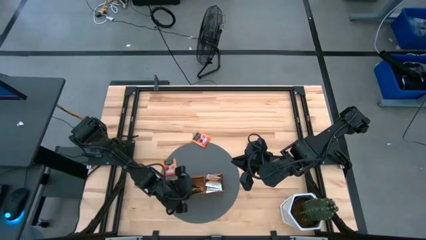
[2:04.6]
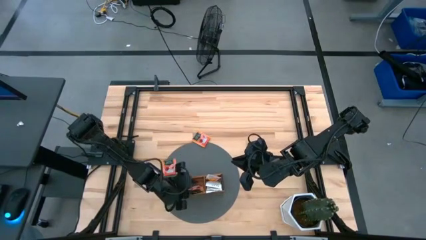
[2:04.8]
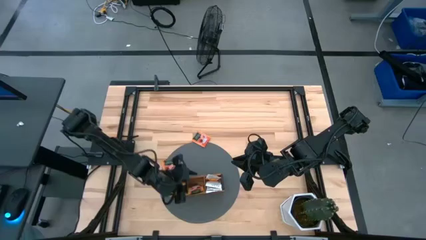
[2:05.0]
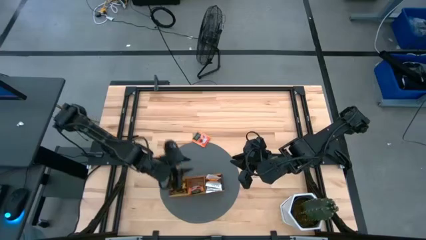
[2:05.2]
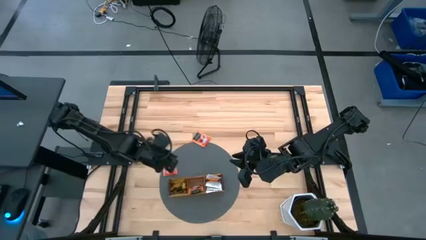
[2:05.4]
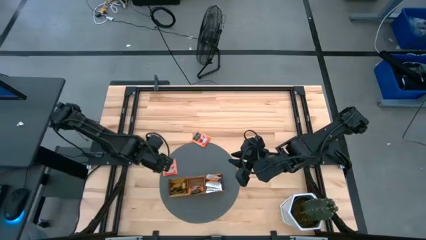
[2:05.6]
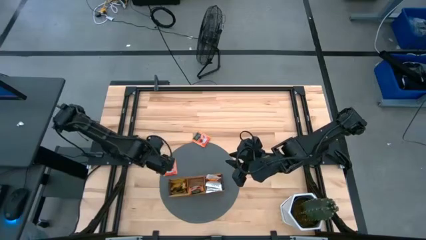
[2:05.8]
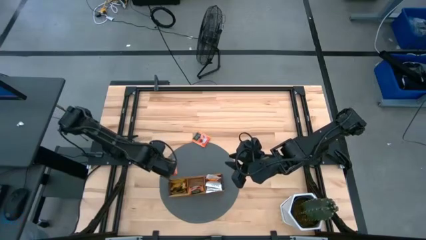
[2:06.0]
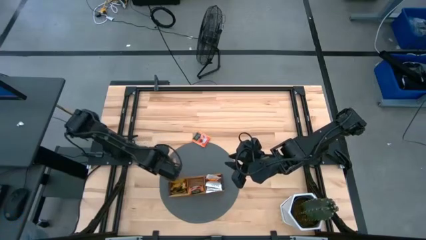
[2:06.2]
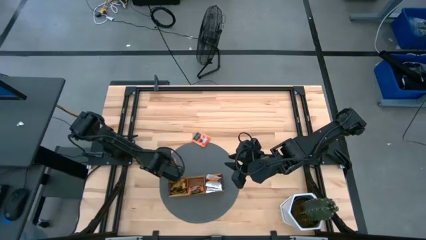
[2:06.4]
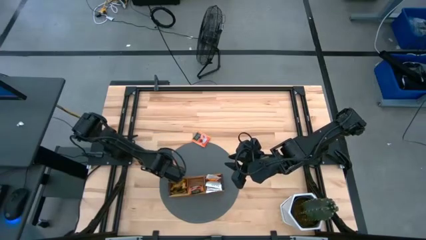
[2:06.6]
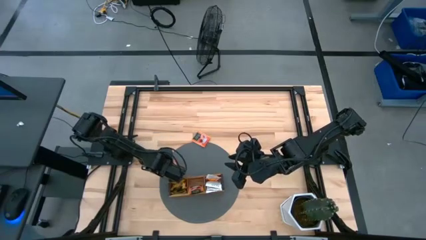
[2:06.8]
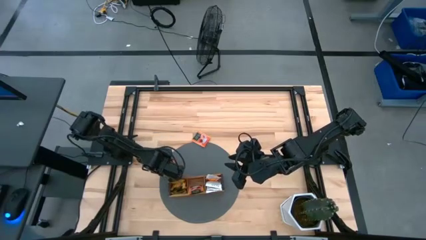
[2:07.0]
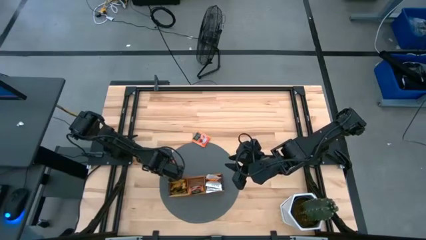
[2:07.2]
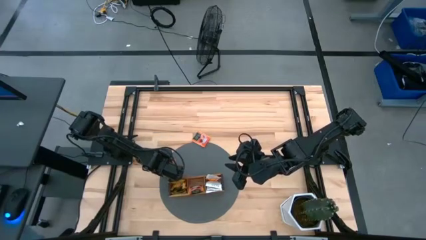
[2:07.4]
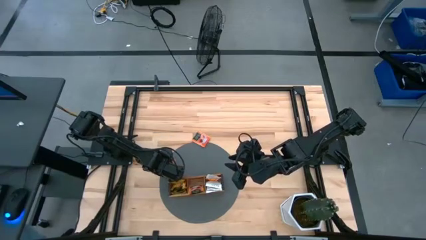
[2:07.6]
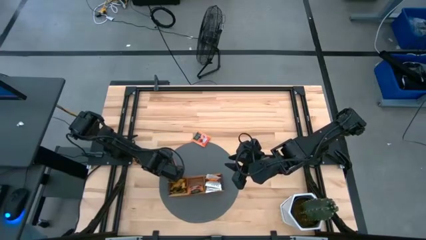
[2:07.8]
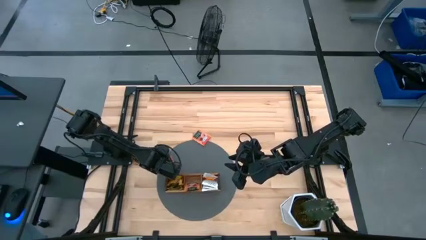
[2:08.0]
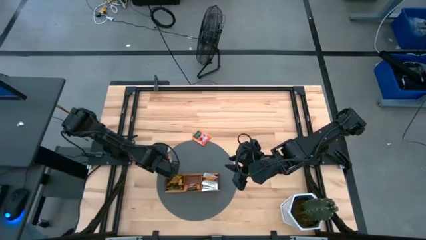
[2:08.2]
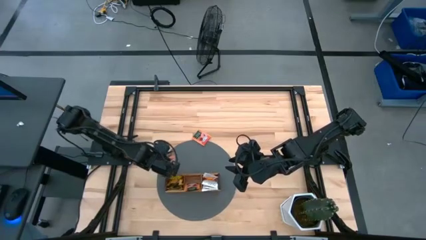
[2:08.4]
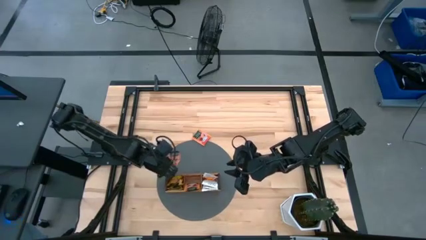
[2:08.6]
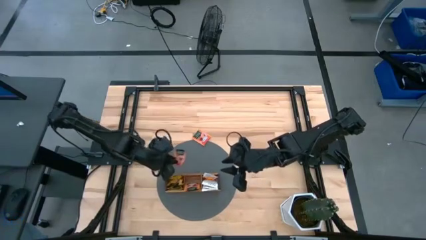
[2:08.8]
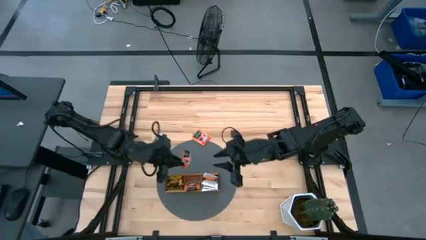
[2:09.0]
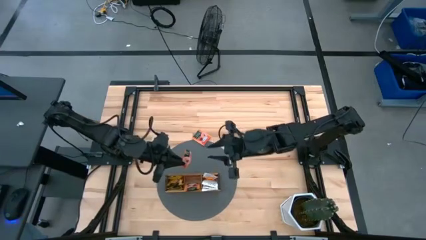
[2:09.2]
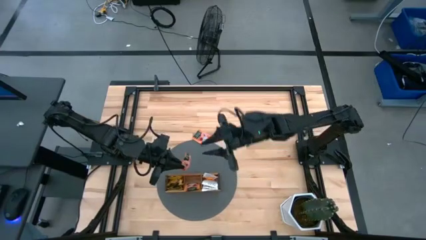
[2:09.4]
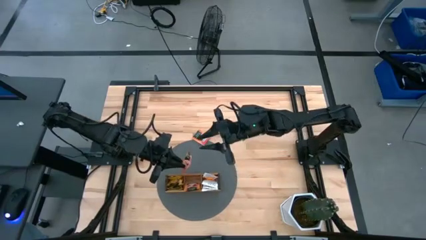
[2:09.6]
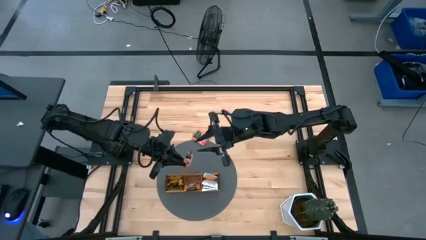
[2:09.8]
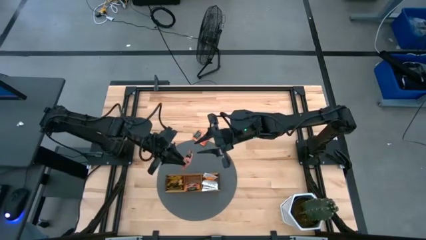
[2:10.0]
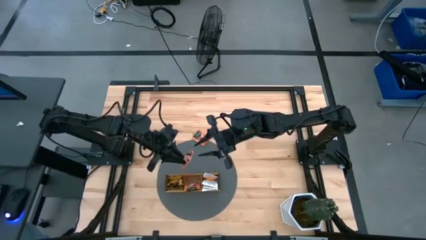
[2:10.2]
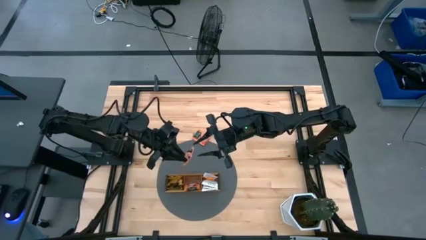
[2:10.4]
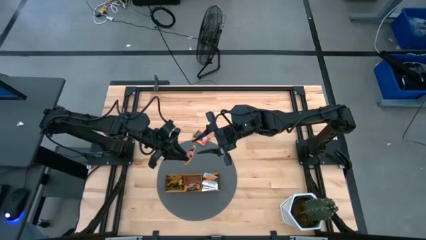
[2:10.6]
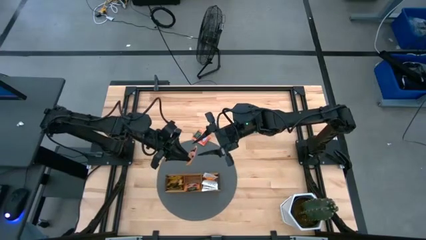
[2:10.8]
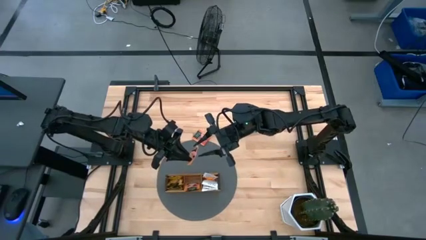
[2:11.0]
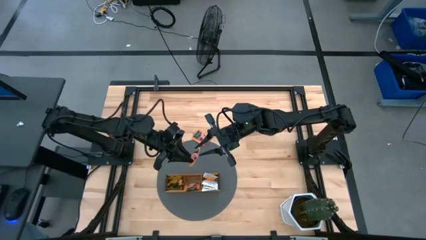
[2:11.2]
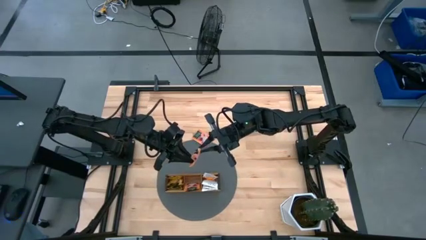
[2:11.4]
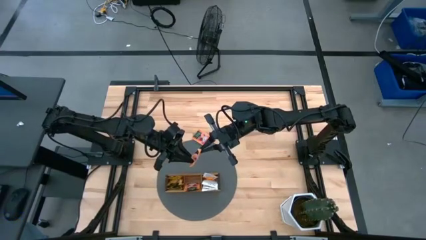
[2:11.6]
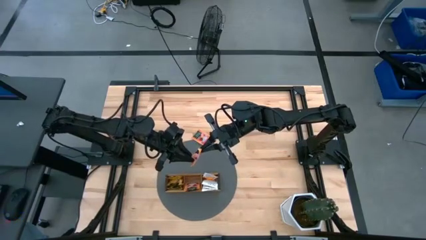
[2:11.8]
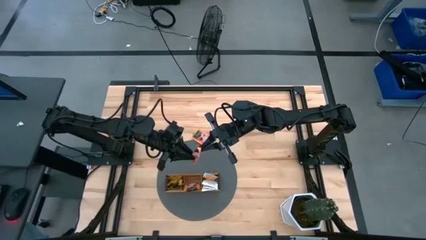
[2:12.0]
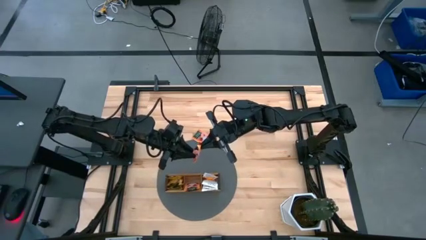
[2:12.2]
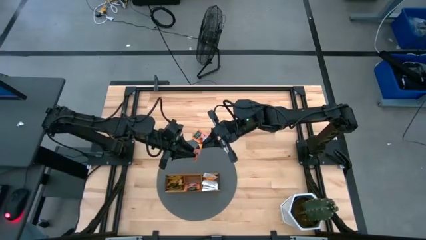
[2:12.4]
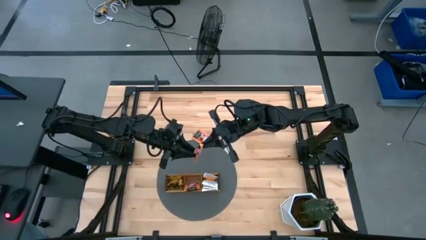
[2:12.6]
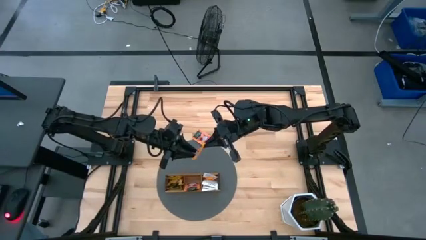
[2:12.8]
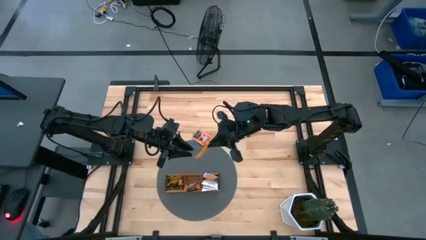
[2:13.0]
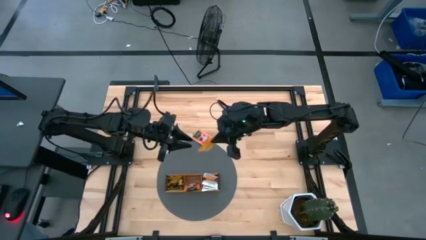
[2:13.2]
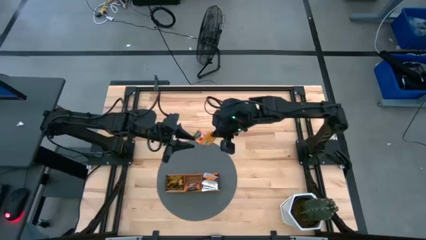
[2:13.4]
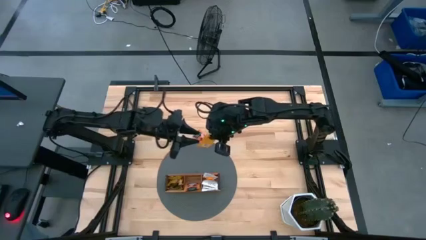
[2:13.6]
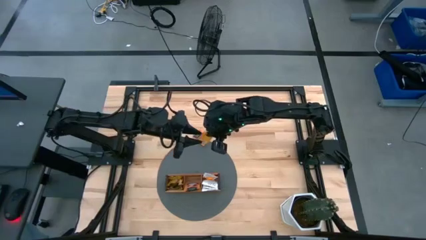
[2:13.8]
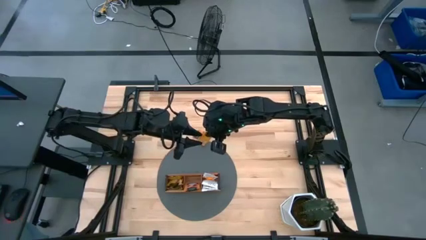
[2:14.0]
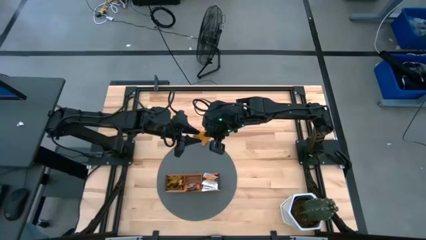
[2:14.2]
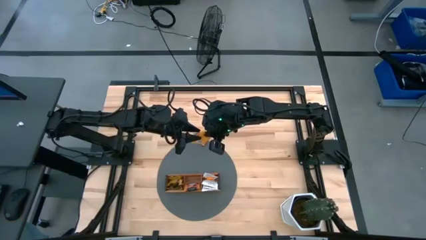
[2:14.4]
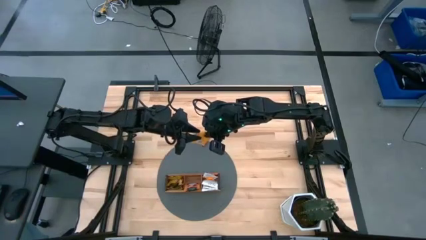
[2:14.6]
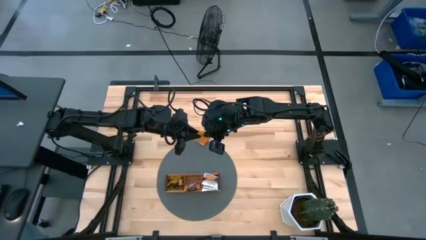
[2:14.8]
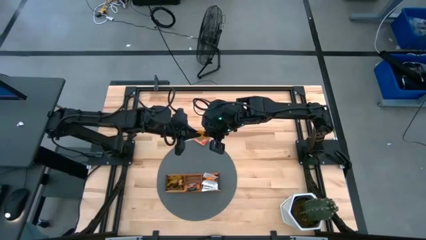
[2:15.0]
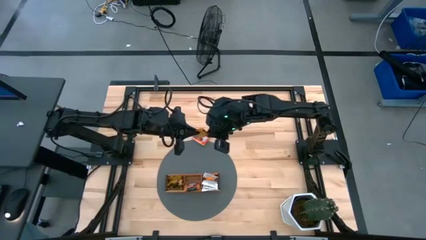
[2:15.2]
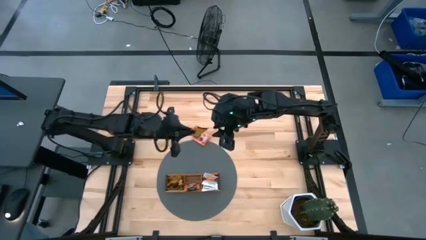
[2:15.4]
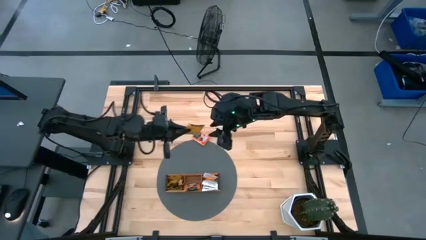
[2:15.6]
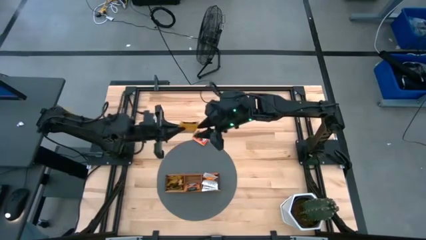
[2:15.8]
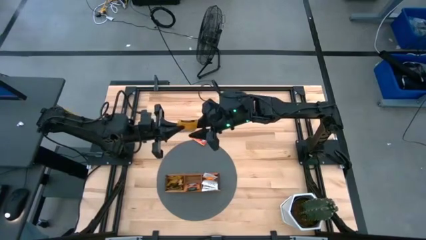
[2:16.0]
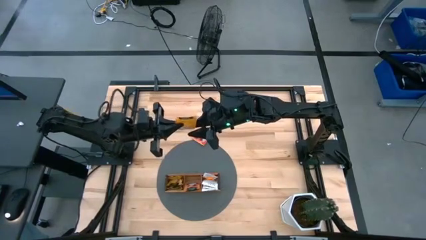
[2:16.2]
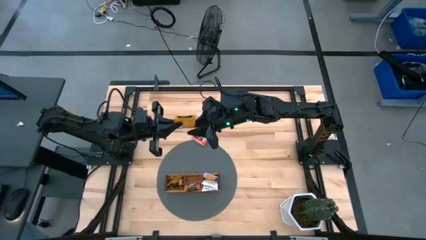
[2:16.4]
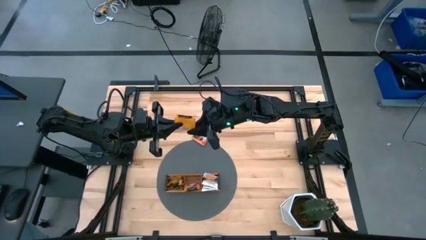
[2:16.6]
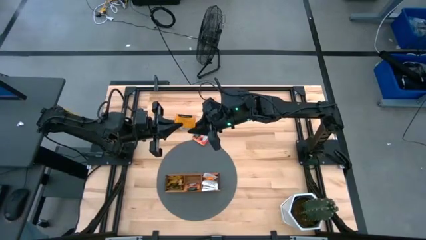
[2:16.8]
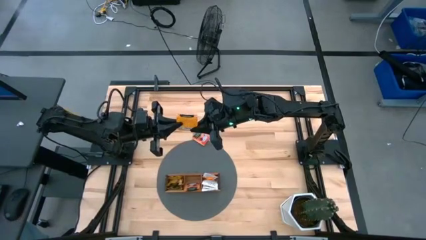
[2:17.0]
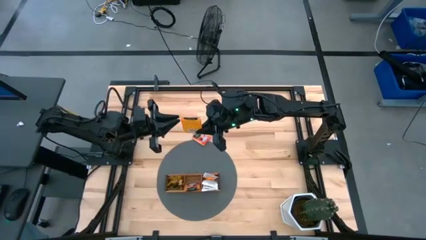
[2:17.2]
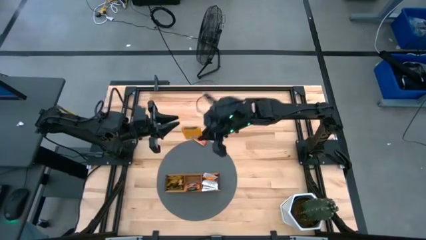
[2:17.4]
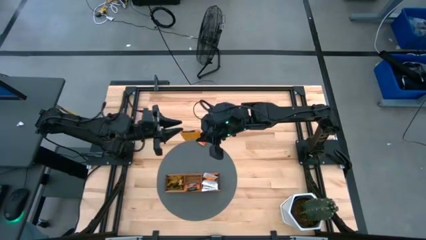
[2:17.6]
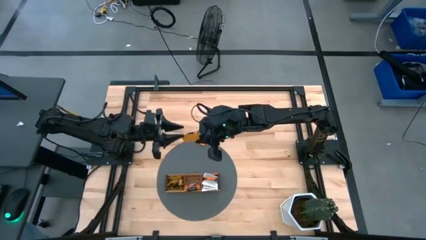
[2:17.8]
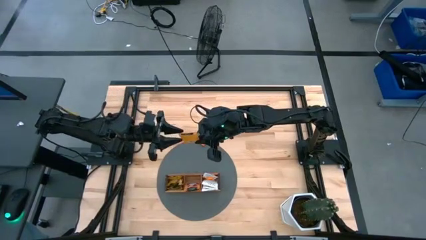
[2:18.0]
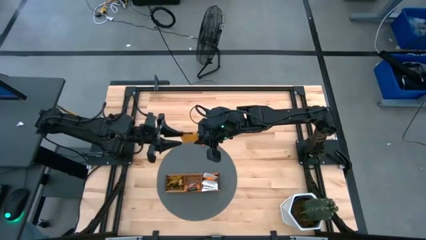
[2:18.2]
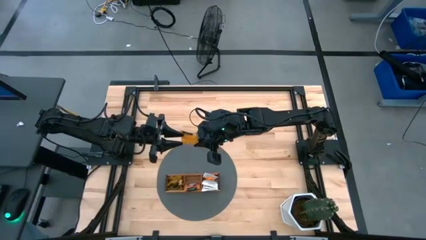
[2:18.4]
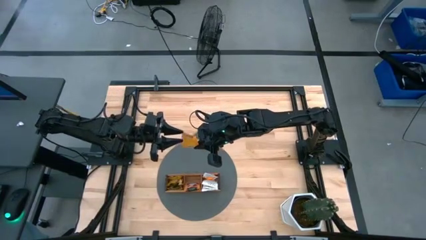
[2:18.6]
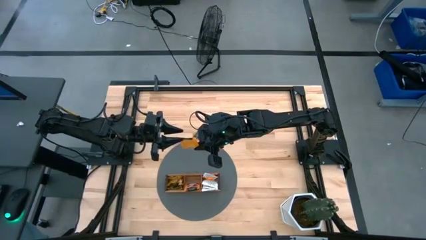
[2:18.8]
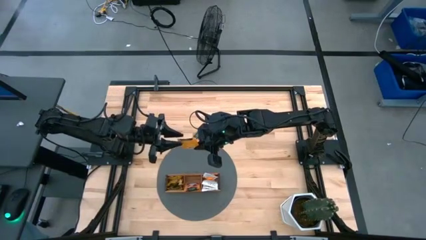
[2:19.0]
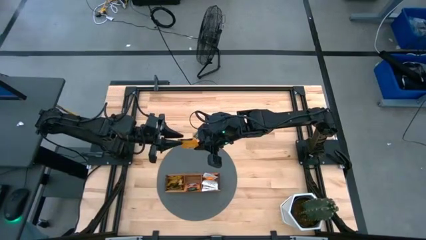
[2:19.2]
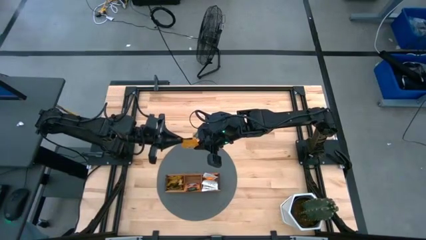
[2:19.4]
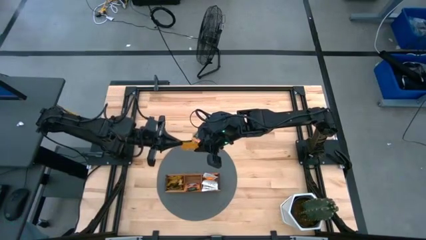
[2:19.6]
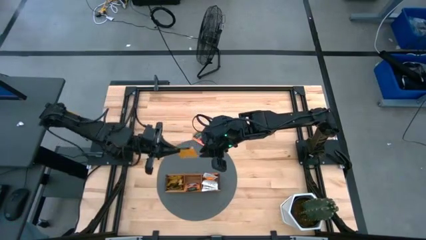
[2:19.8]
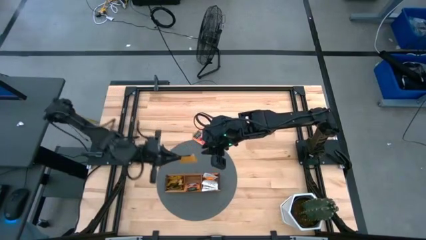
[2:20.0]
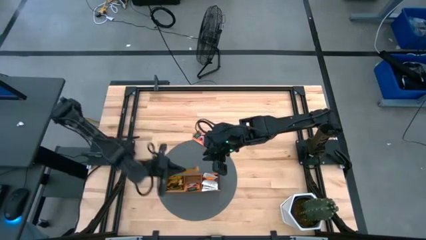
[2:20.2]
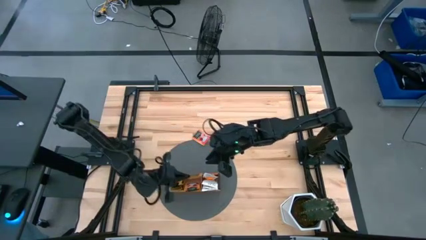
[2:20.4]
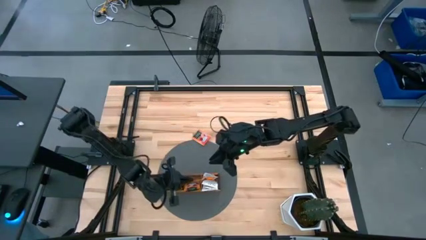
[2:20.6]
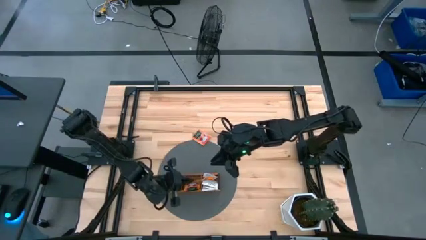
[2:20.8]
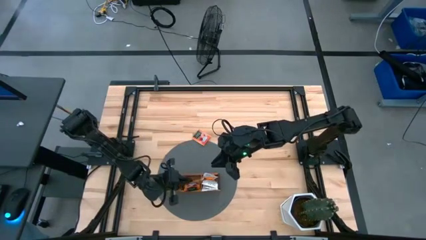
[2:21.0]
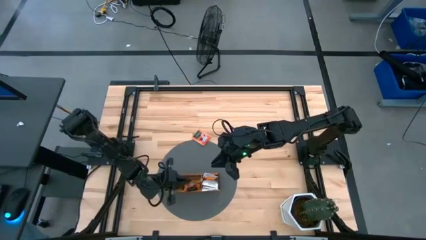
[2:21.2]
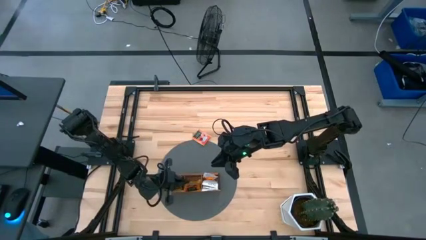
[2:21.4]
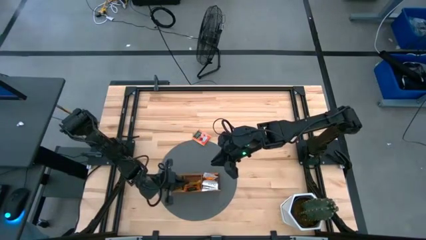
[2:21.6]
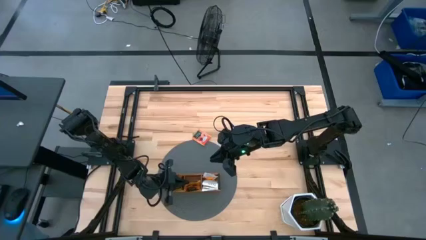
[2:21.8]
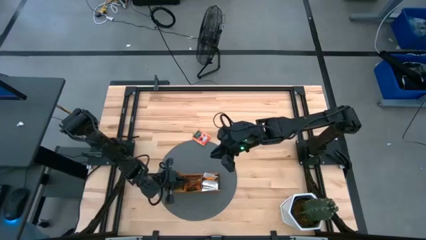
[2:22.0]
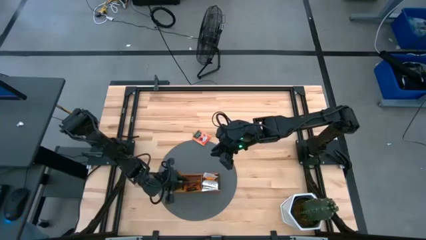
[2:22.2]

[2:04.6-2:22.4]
Task: Pick & Place Tea
Put the orange tea bag into the middle section of the wooden organizer
